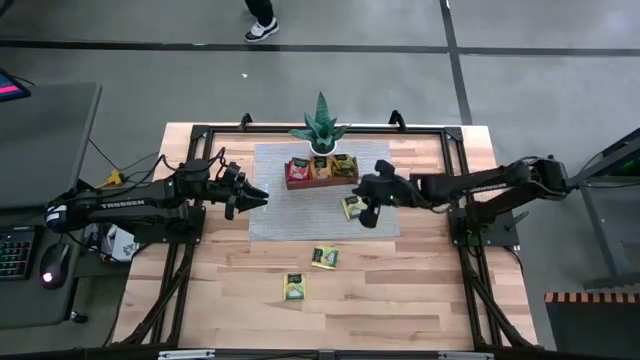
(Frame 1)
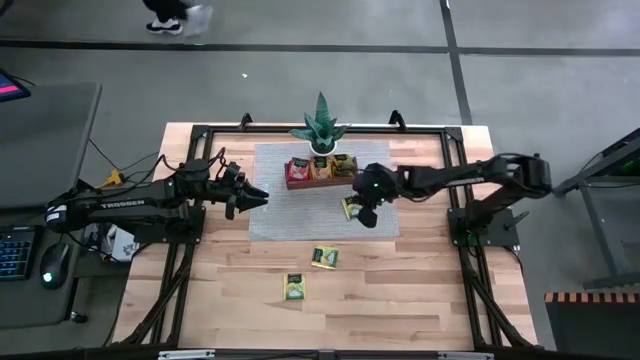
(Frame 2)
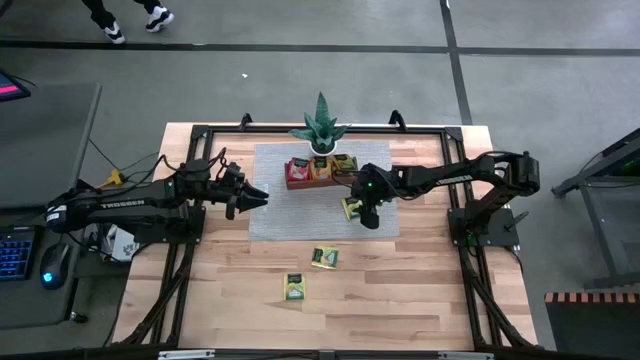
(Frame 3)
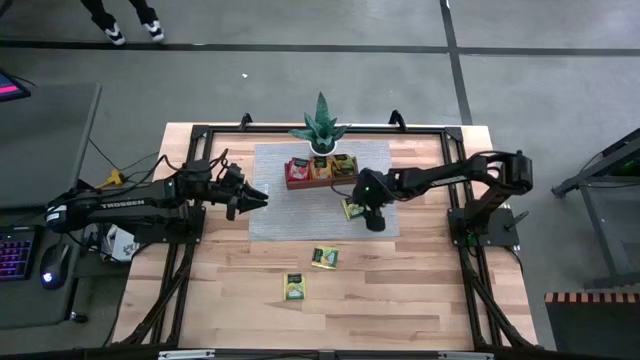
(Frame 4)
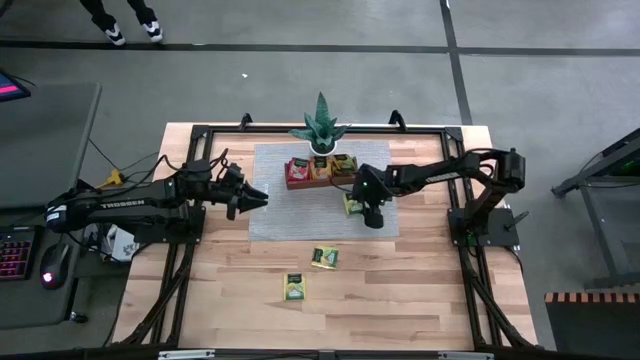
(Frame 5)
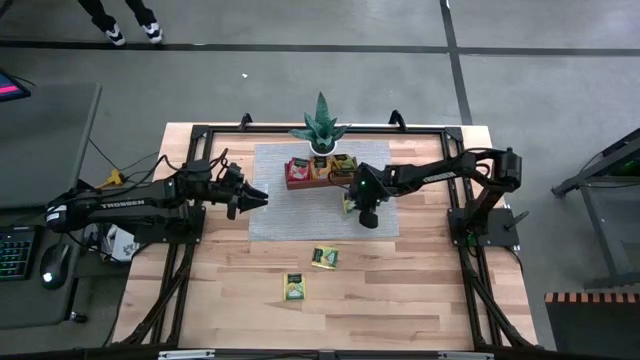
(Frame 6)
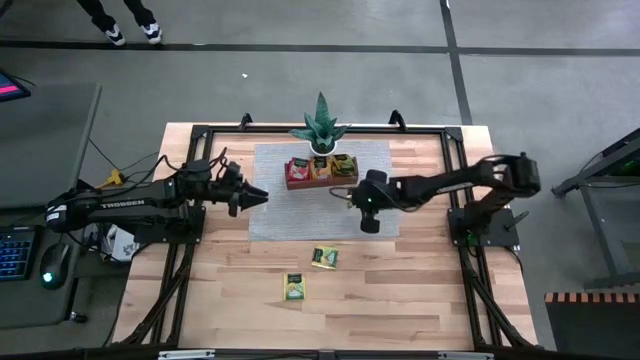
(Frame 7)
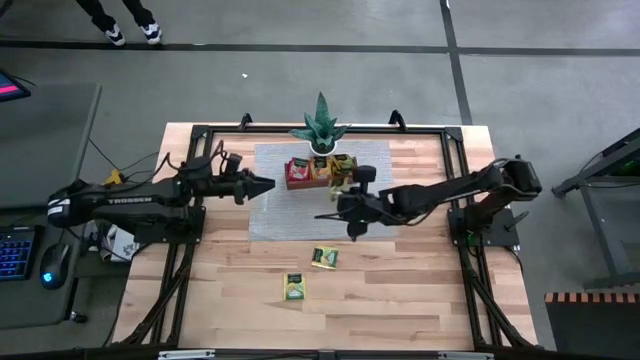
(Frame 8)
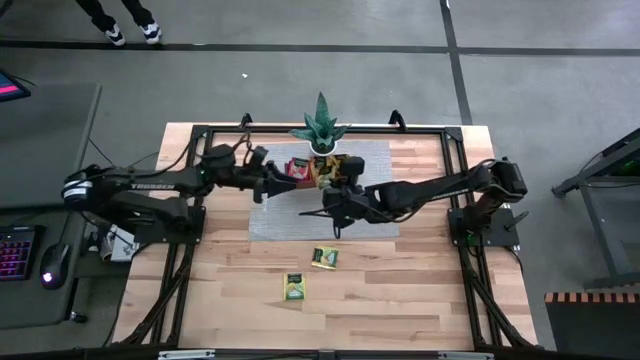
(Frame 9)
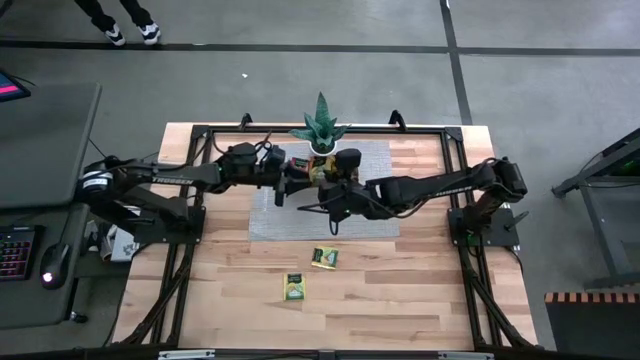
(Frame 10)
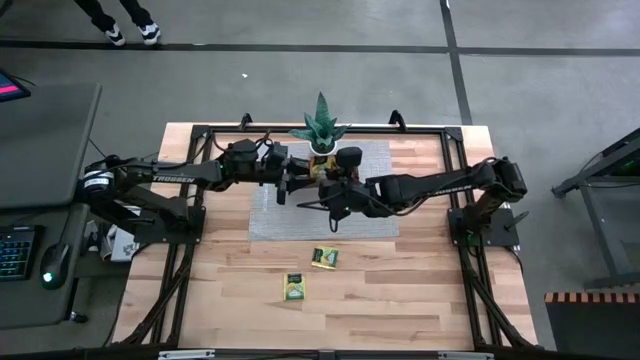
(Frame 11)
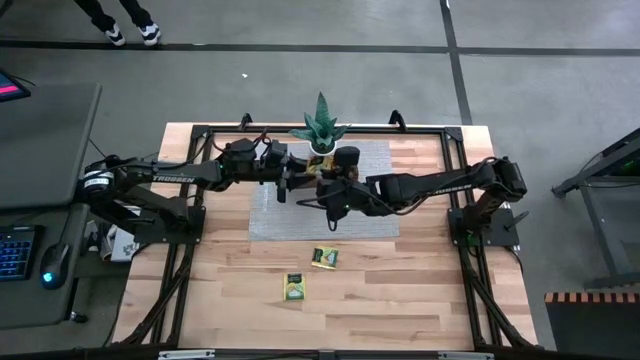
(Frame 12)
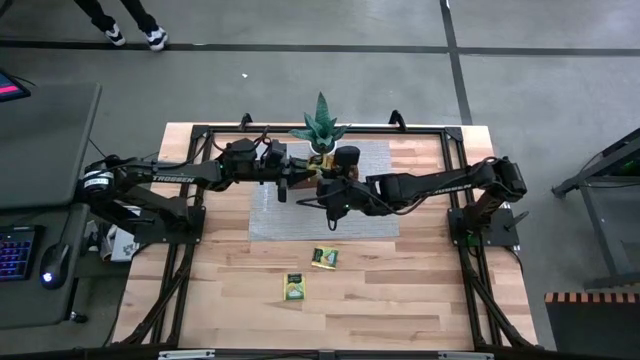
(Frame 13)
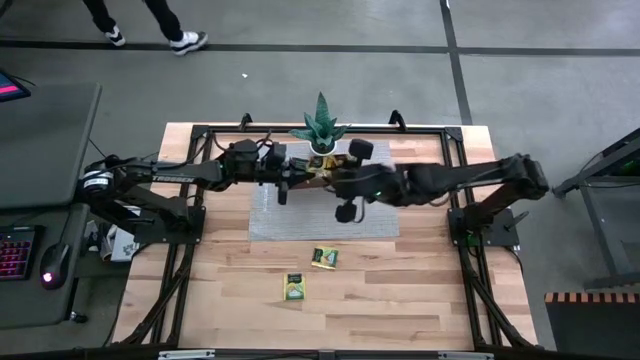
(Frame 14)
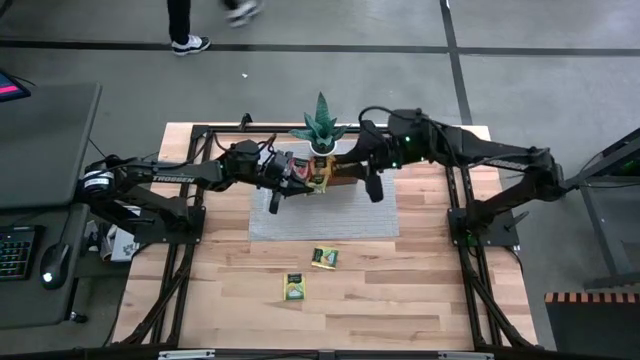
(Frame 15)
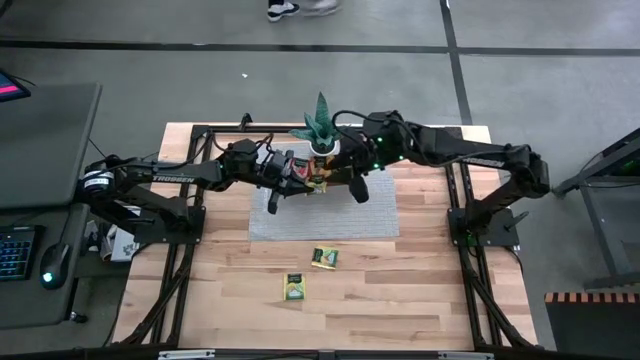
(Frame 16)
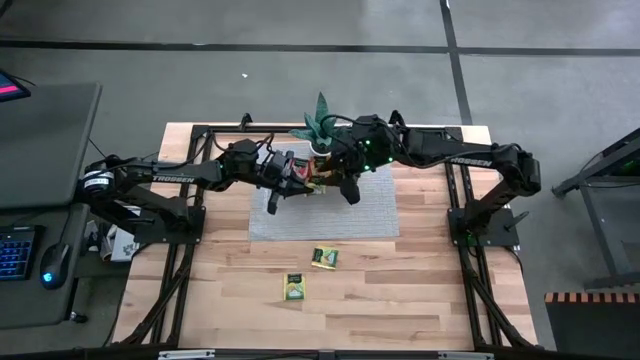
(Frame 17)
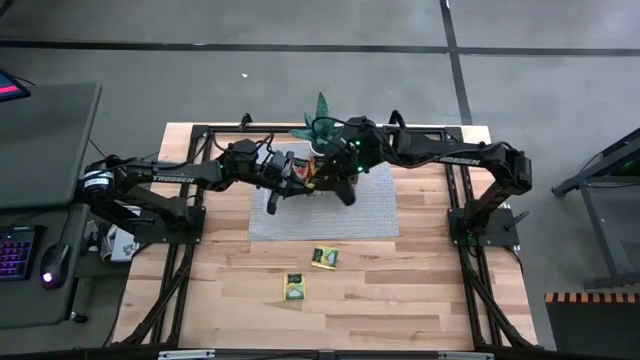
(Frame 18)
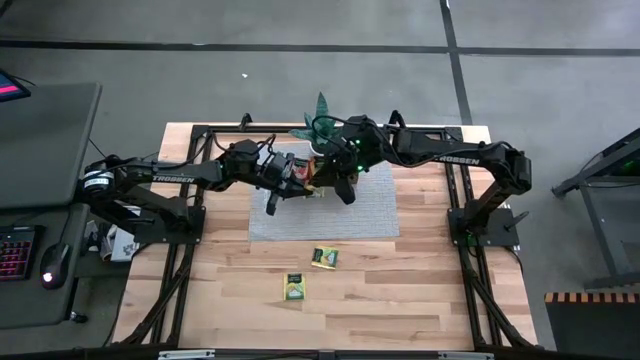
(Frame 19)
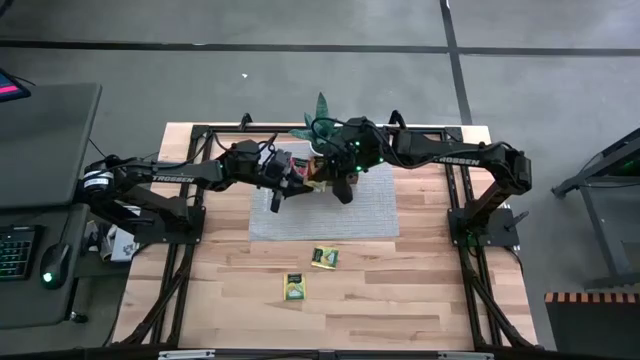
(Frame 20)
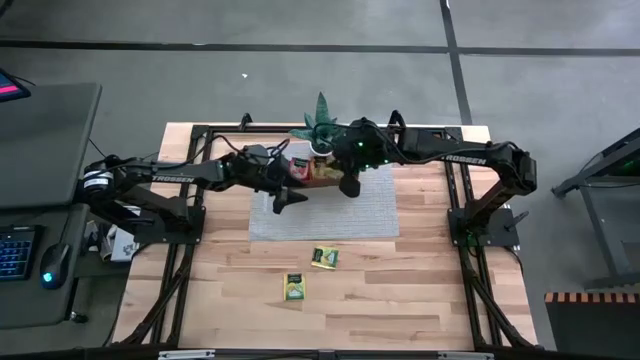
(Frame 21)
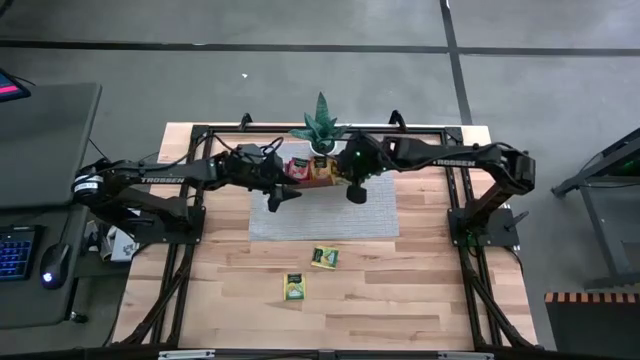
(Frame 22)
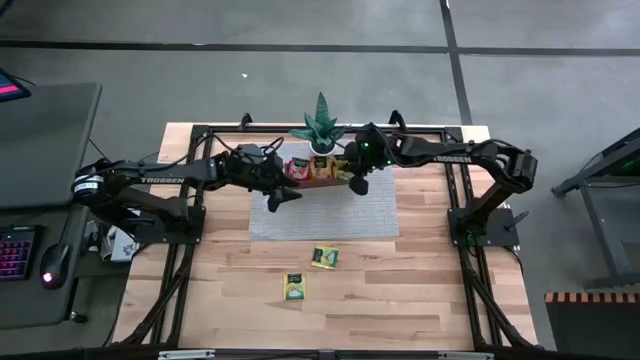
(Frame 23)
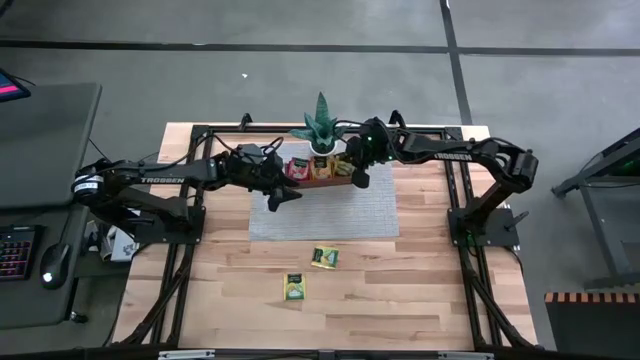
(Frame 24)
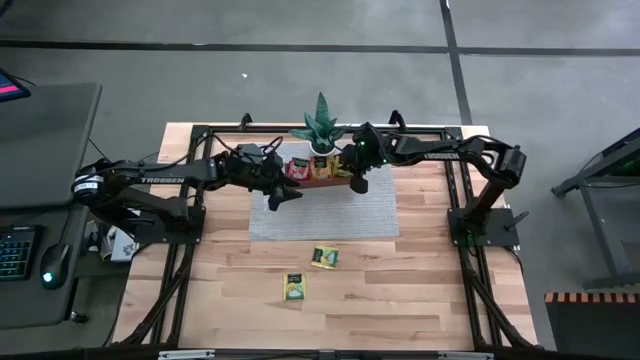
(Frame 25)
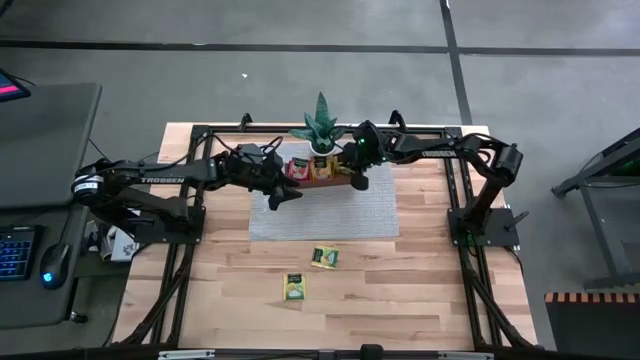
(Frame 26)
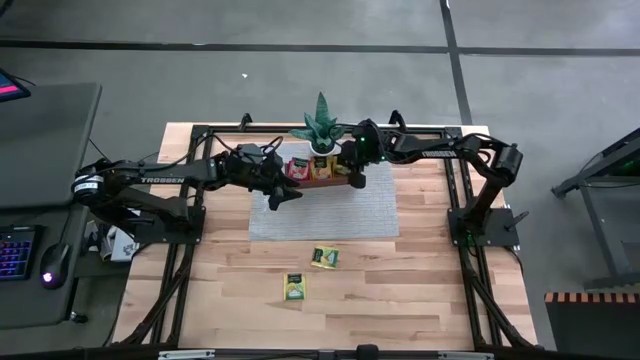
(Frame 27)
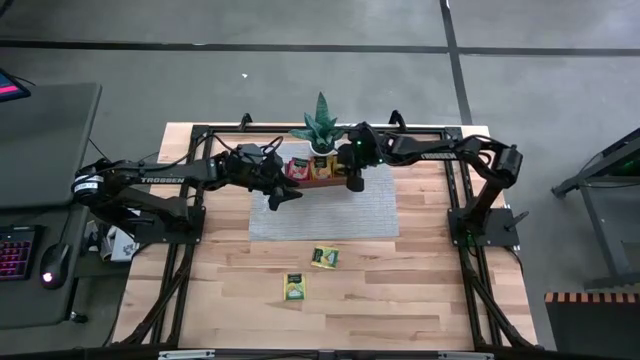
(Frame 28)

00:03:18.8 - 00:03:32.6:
Task: Pick & Place Tea
Put the yellow tea bag into the right section of the wooden organizer

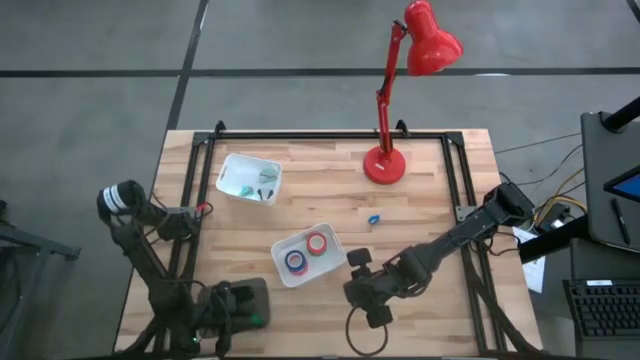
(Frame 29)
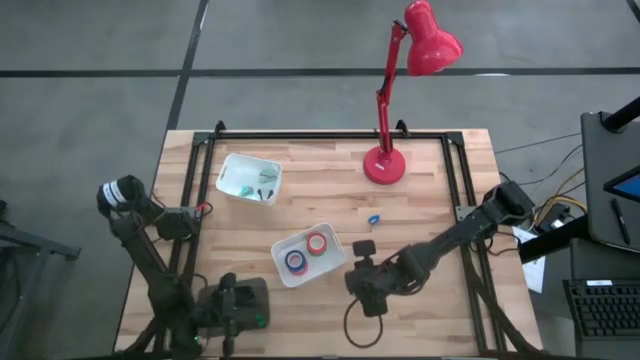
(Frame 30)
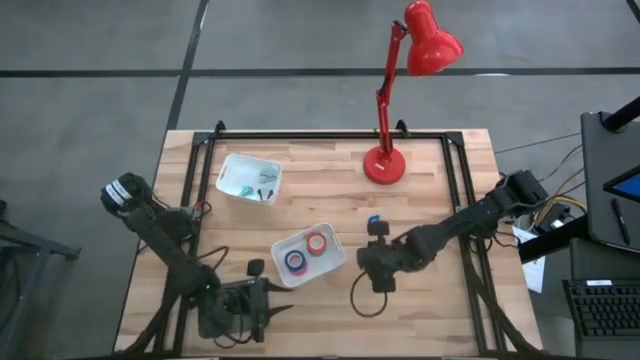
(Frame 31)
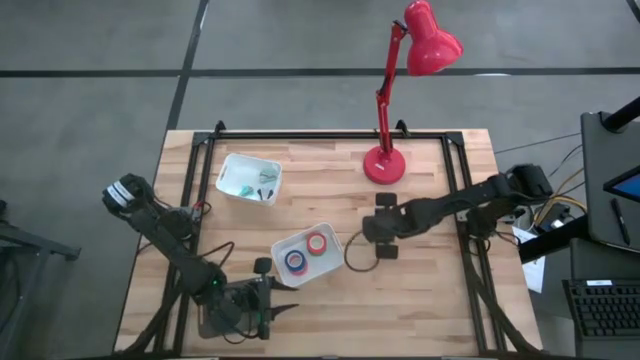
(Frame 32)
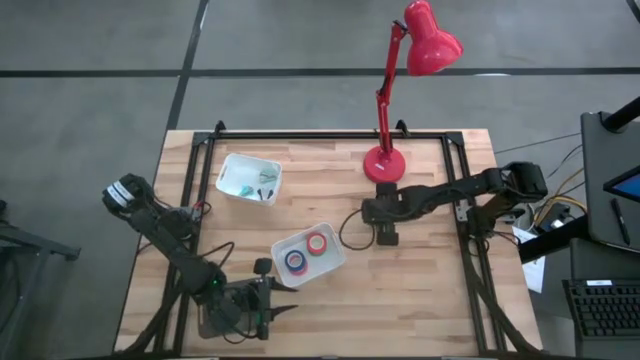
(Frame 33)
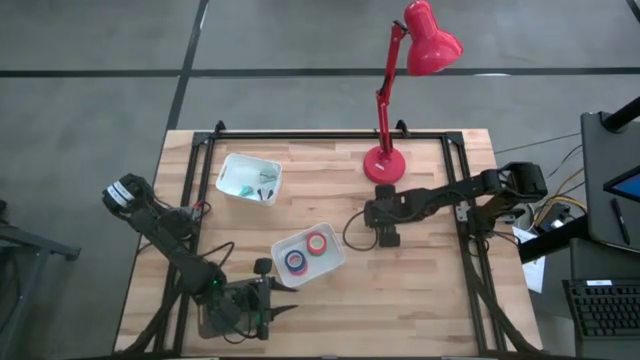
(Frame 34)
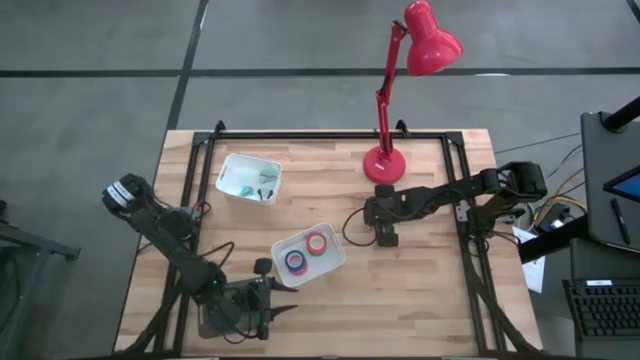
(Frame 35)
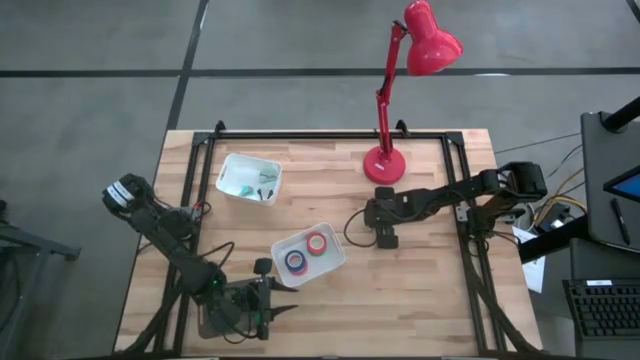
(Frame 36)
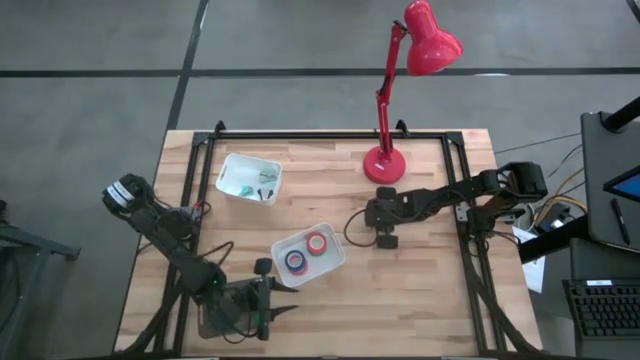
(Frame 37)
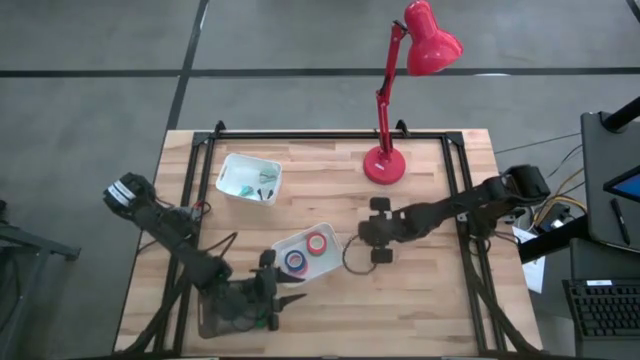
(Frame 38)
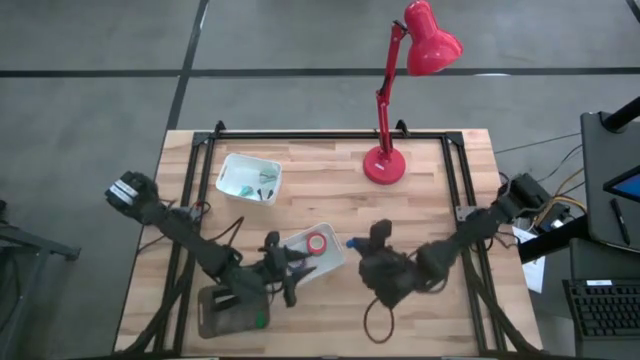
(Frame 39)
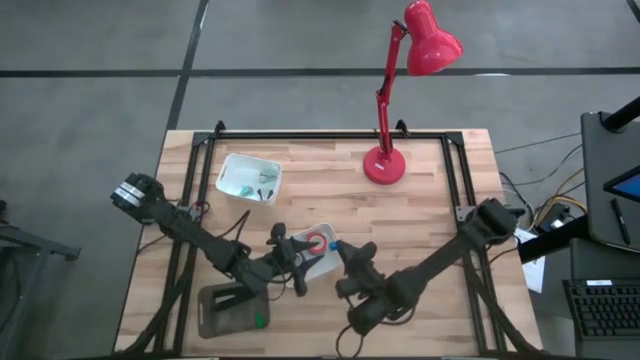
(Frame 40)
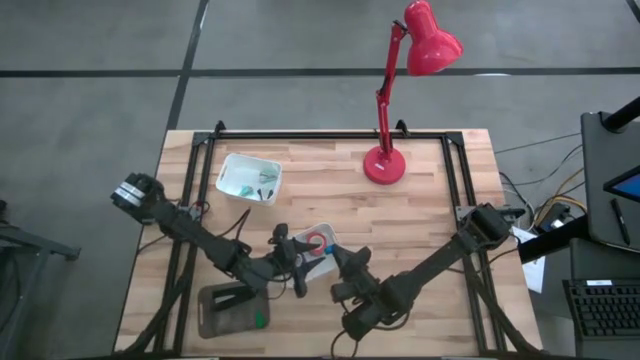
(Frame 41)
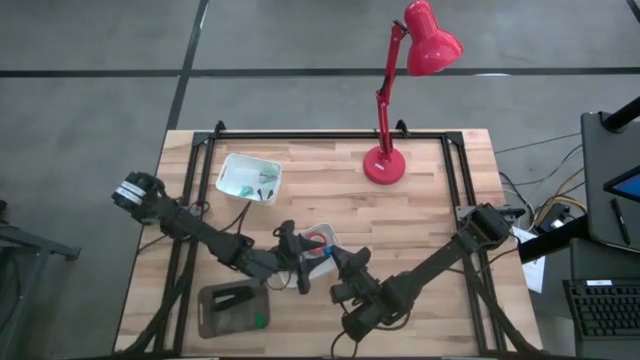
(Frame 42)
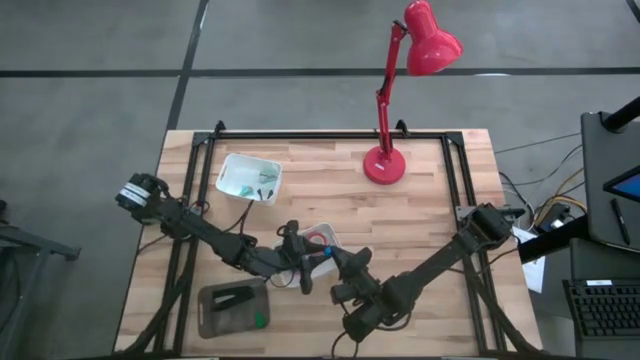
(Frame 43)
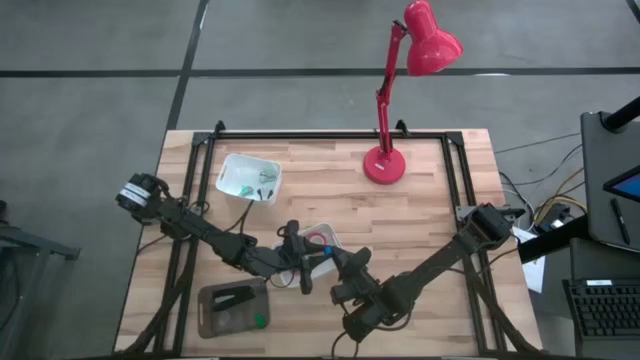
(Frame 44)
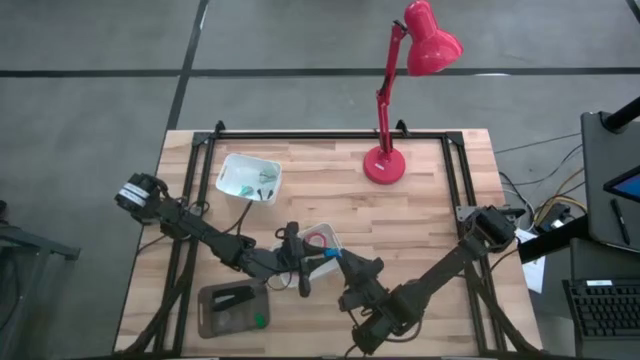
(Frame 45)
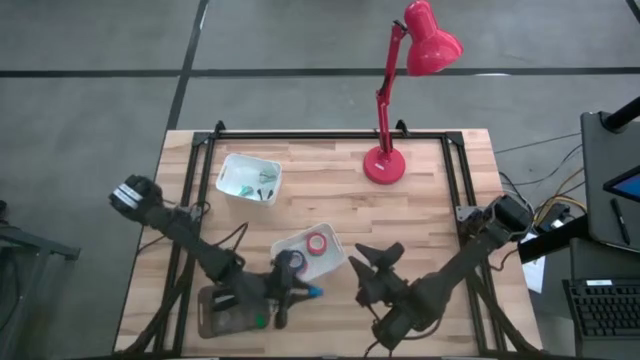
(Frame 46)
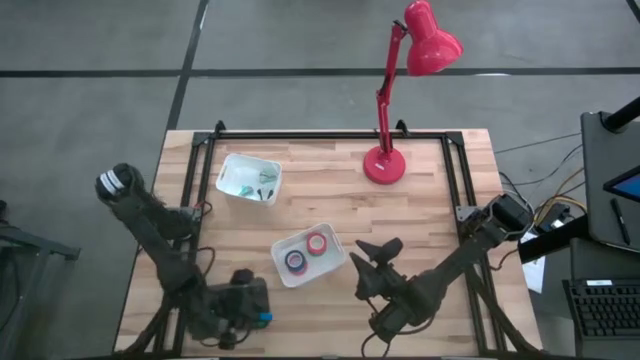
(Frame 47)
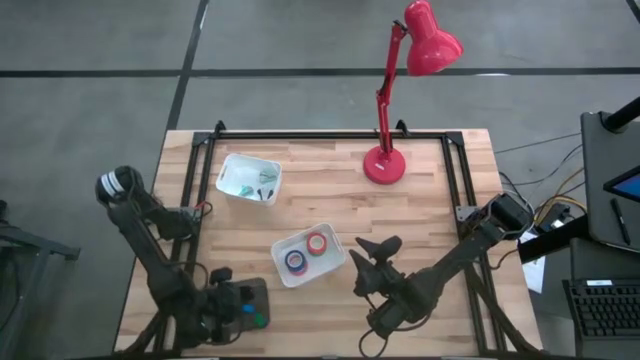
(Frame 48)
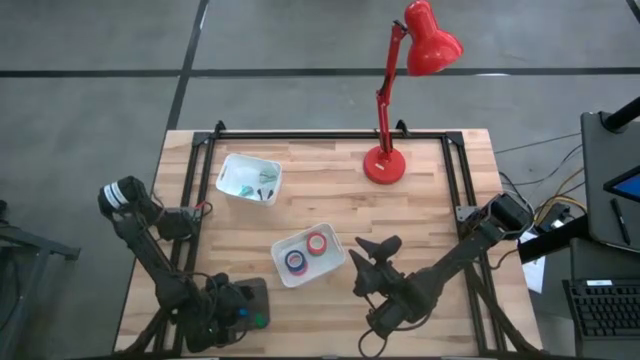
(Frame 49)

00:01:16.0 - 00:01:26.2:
Task: Pick and place Stapler, Stapler remover, tape
Put the blue stapler into the black bin
